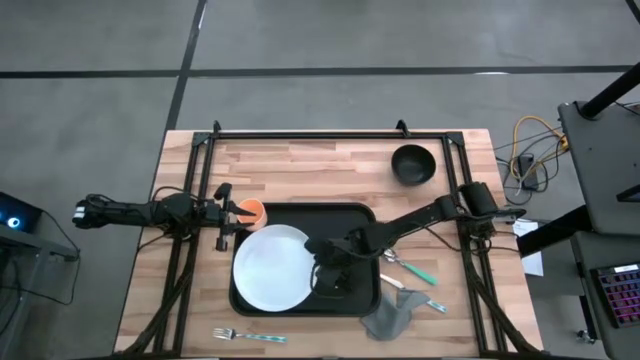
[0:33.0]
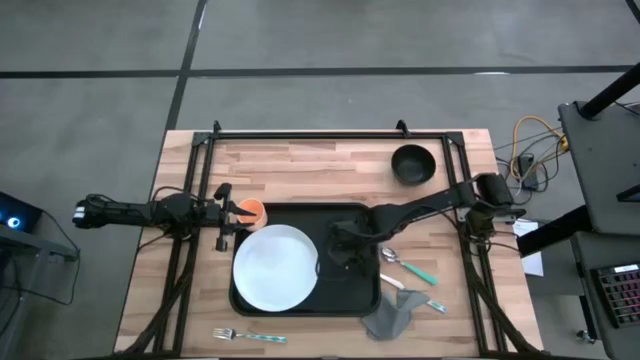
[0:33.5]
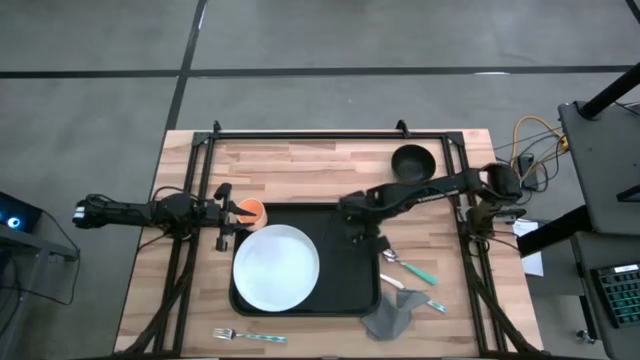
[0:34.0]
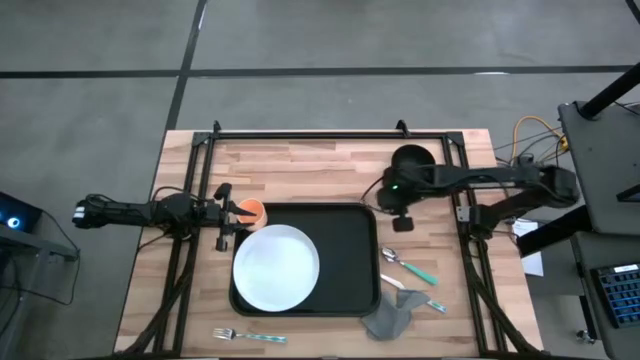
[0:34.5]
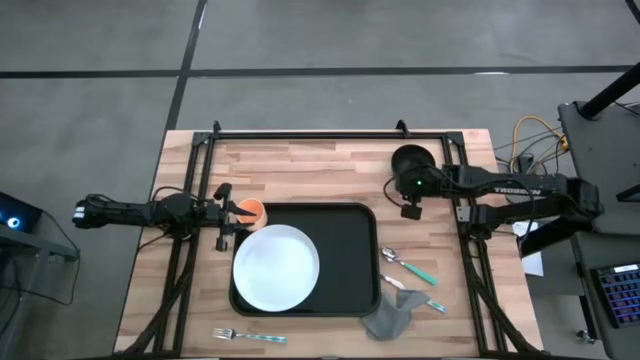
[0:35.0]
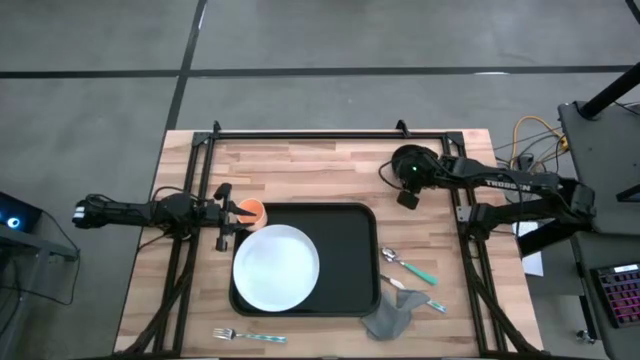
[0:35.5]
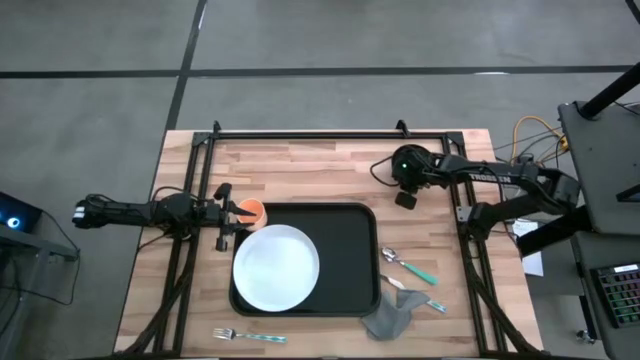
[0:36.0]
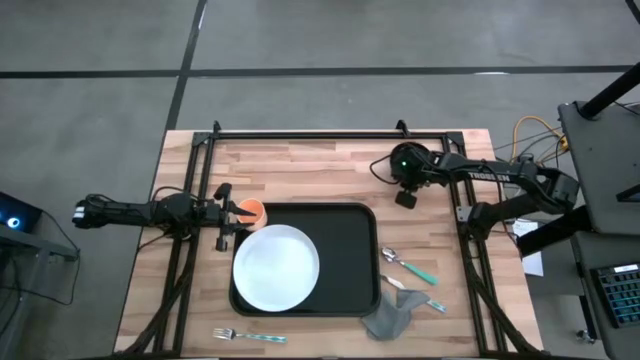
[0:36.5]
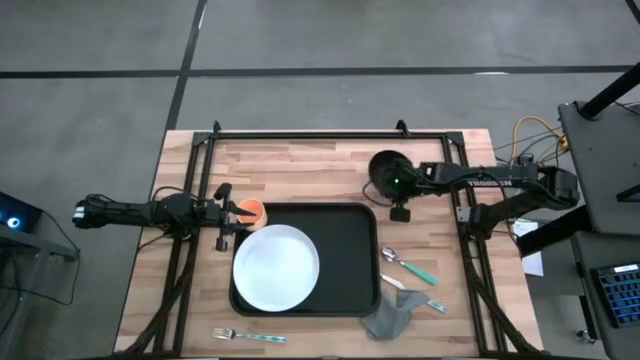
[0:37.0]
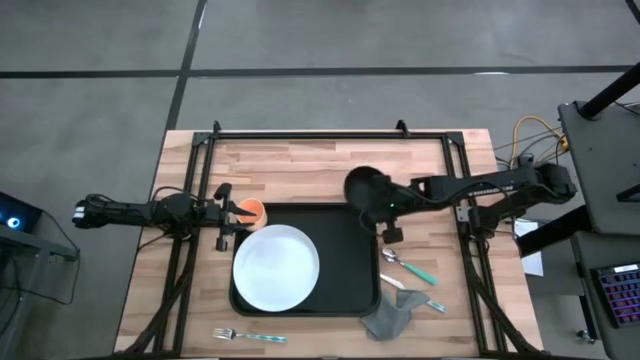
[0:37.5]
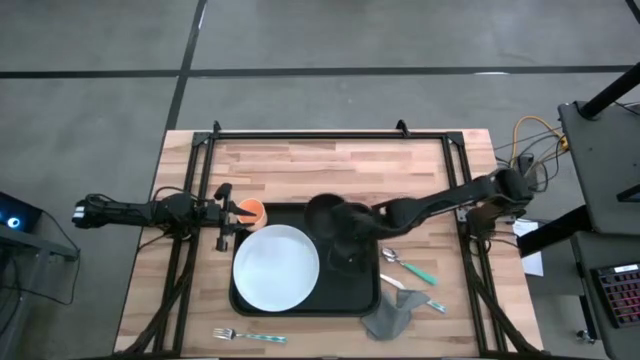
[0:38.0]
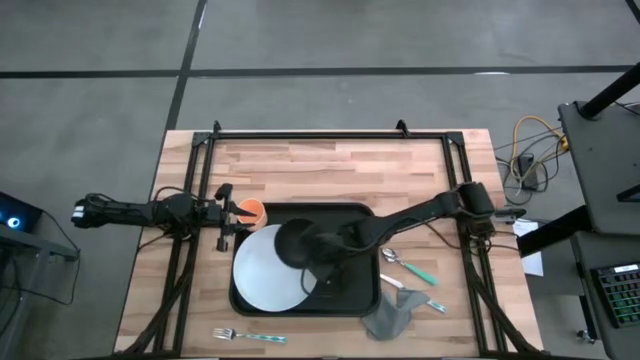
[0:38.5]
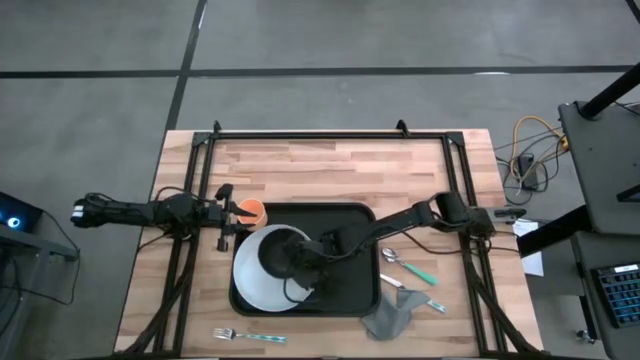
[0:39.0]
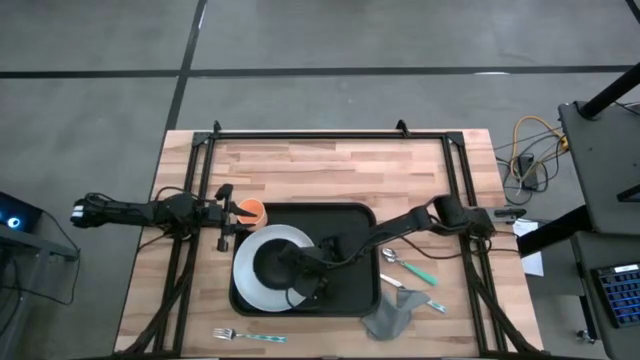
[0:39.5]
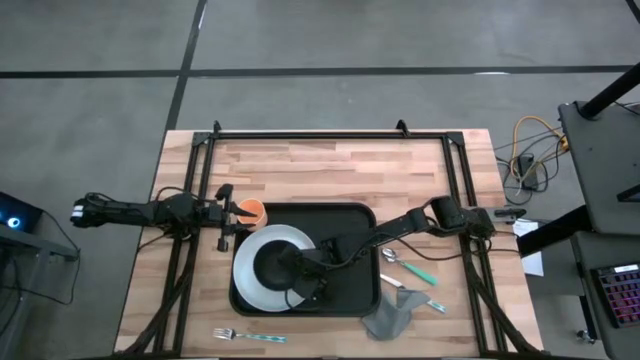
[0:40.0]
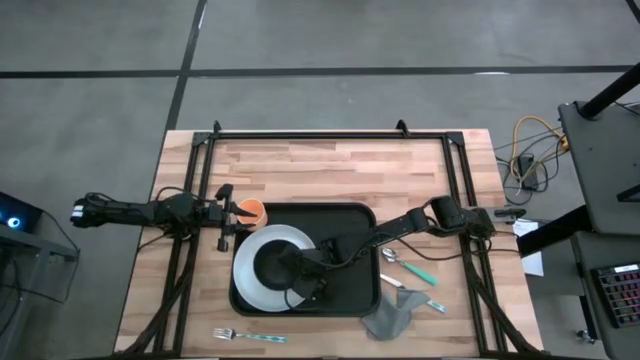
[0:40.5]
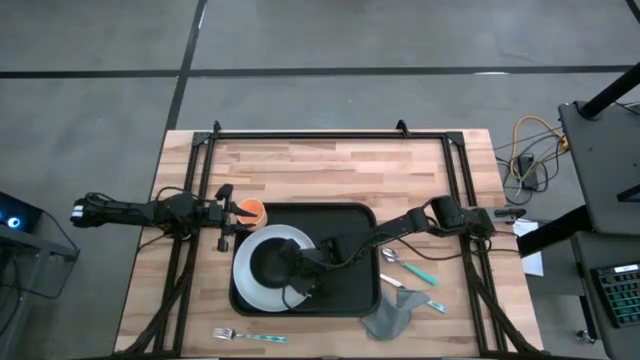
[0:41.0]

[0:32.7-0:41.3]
Task: Set up tray
Put the bowl onto the plate

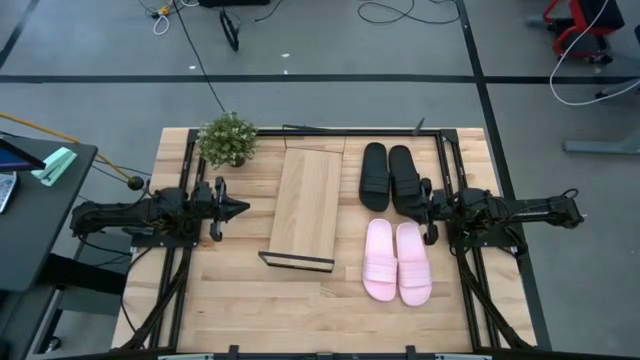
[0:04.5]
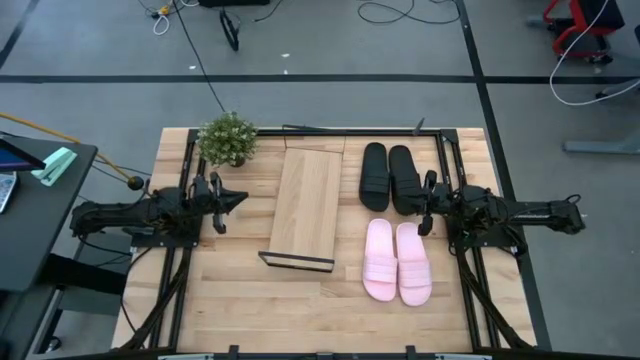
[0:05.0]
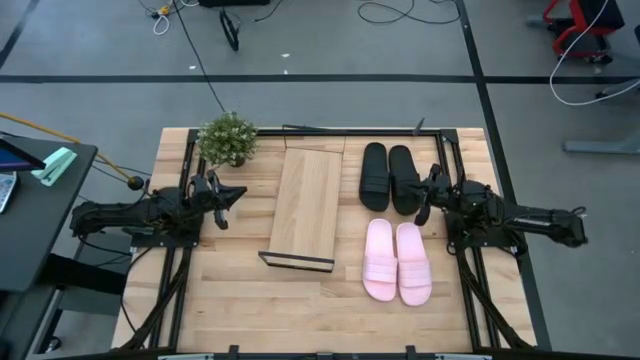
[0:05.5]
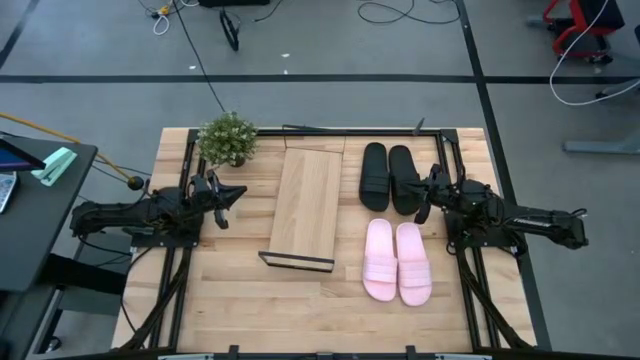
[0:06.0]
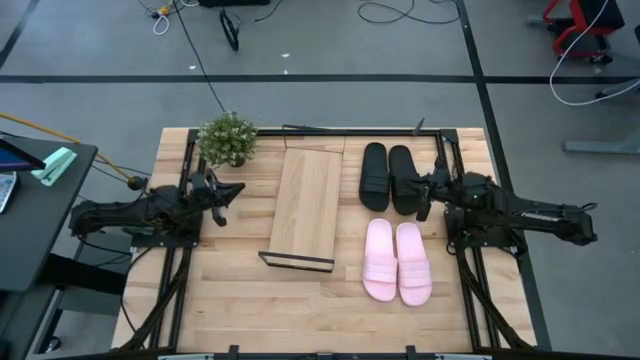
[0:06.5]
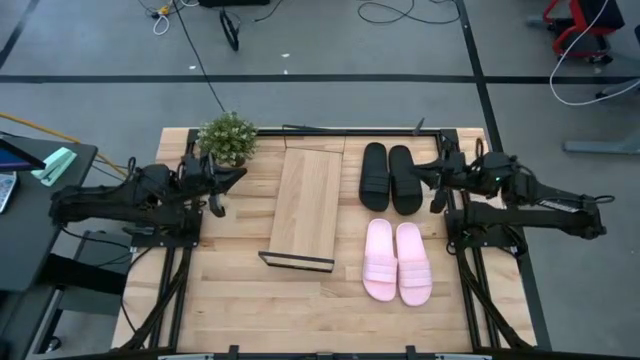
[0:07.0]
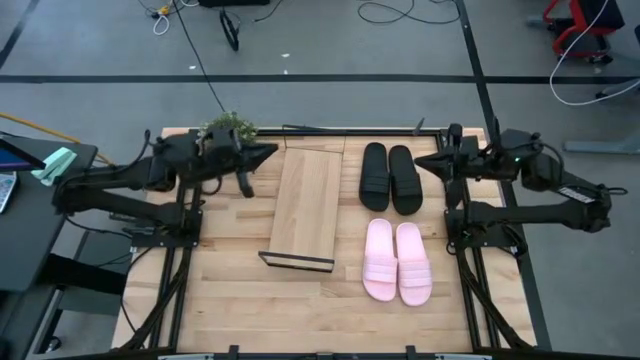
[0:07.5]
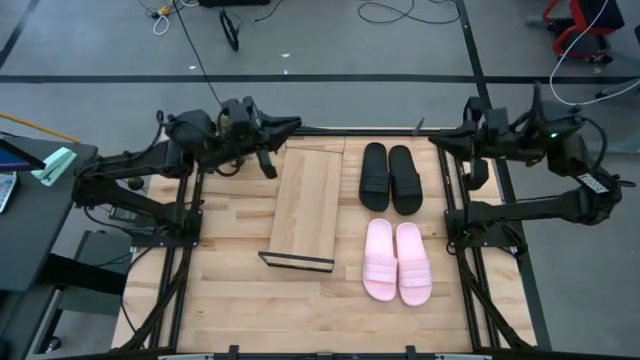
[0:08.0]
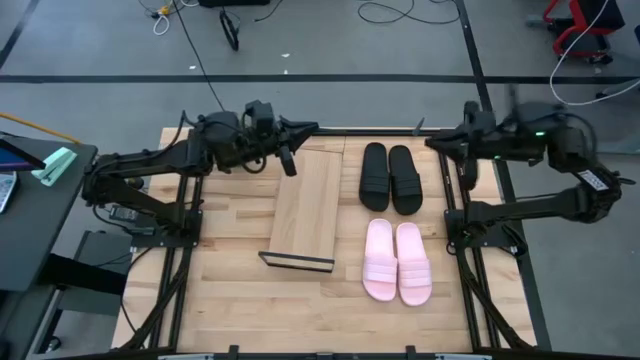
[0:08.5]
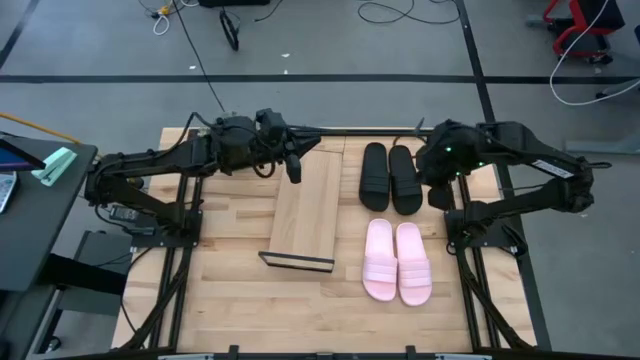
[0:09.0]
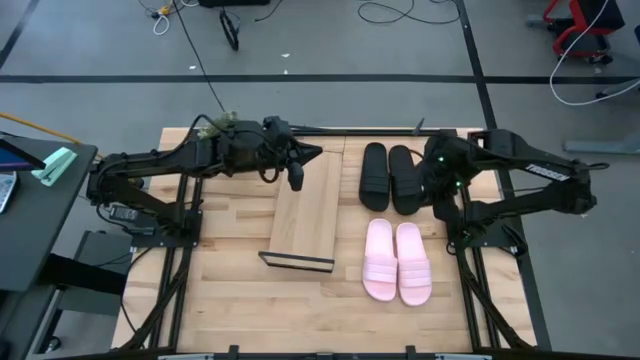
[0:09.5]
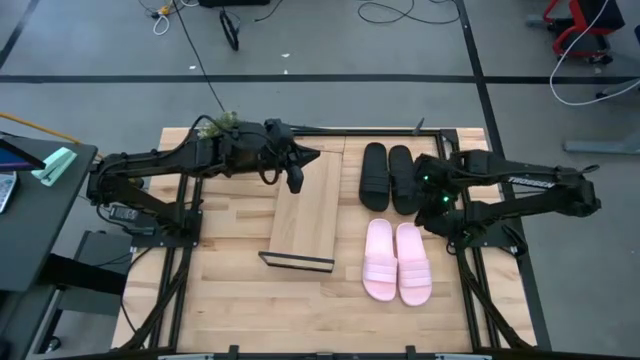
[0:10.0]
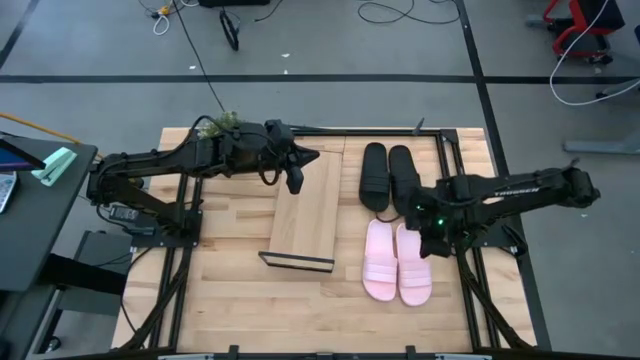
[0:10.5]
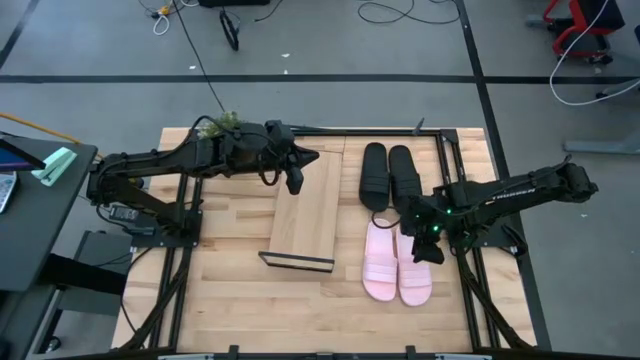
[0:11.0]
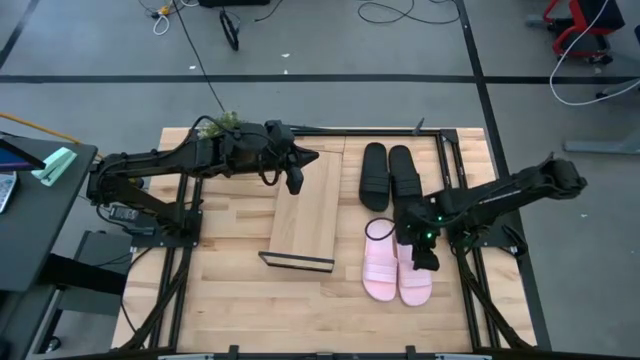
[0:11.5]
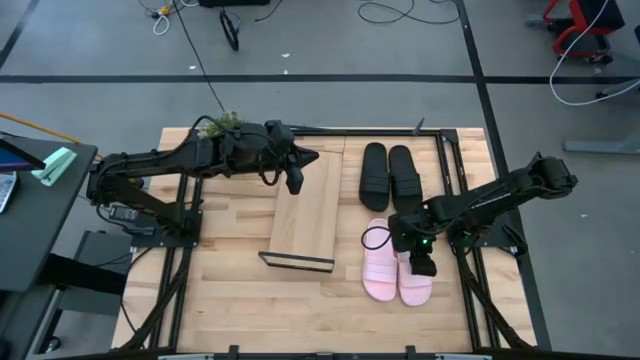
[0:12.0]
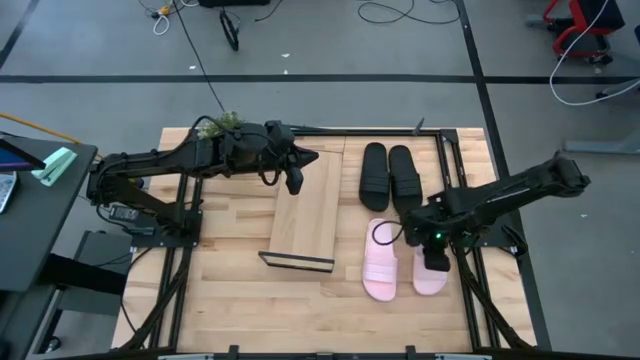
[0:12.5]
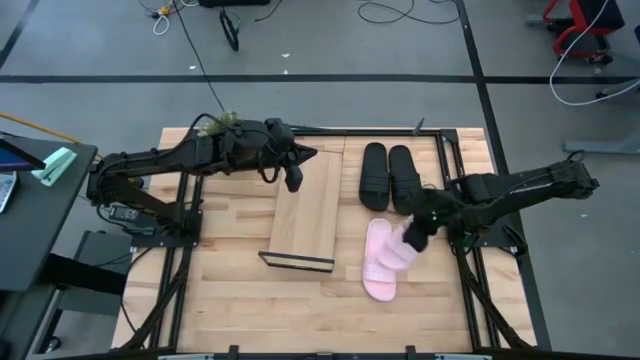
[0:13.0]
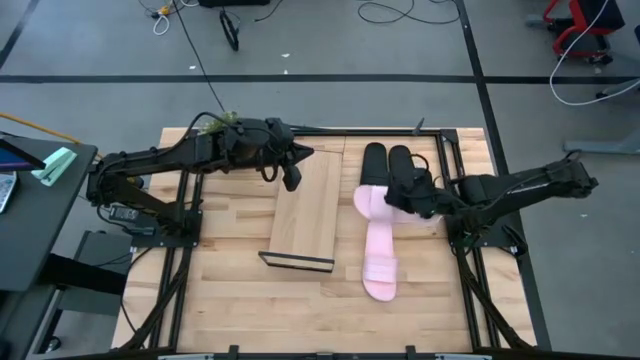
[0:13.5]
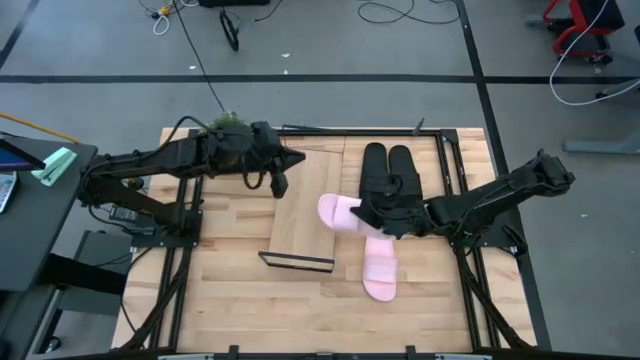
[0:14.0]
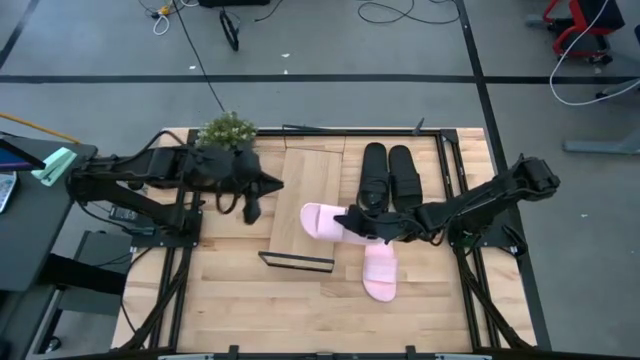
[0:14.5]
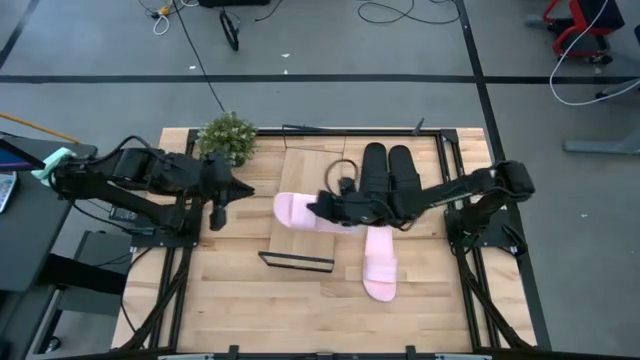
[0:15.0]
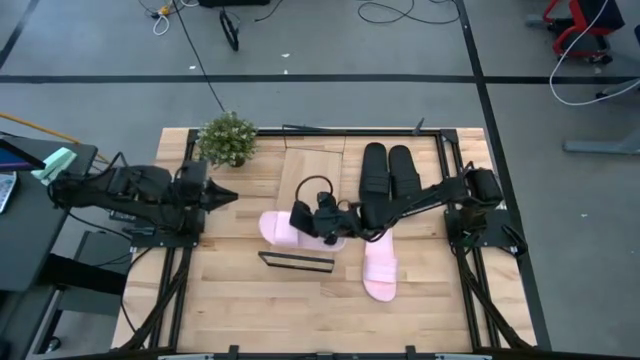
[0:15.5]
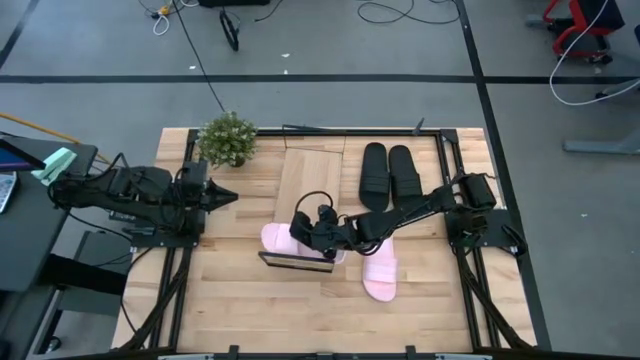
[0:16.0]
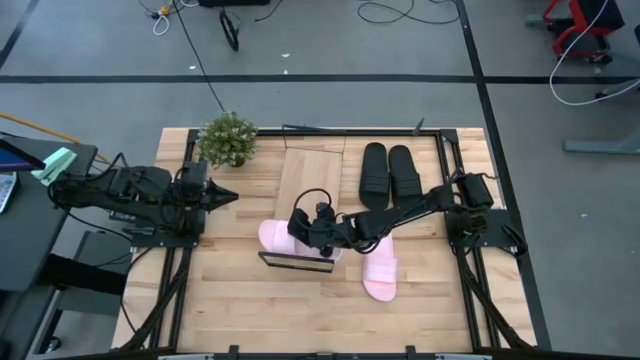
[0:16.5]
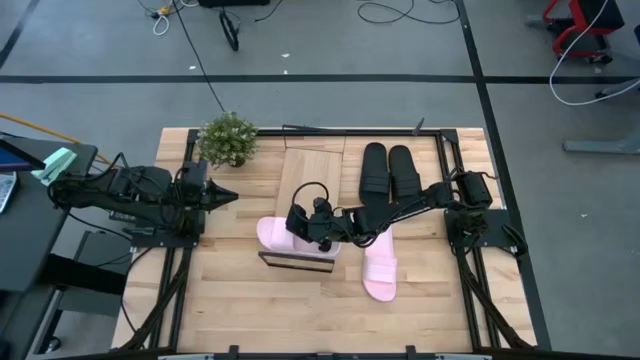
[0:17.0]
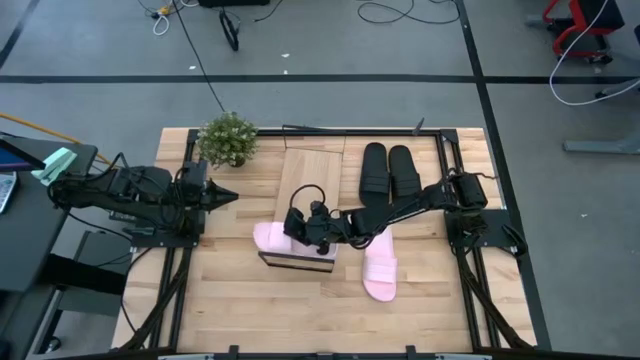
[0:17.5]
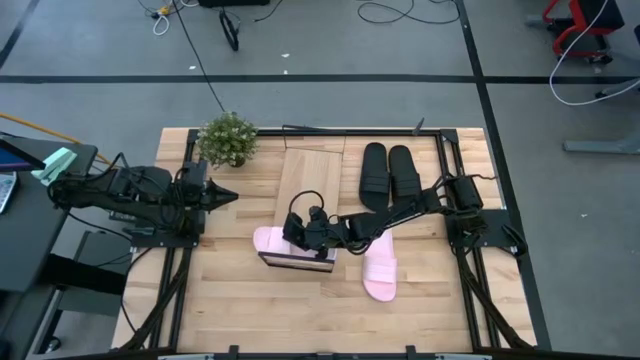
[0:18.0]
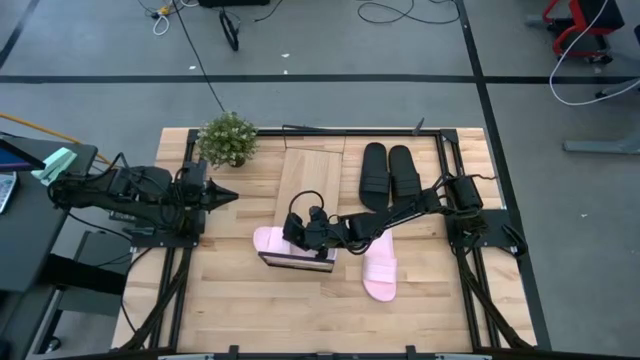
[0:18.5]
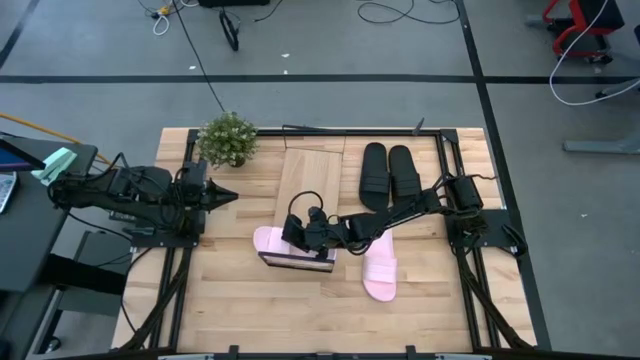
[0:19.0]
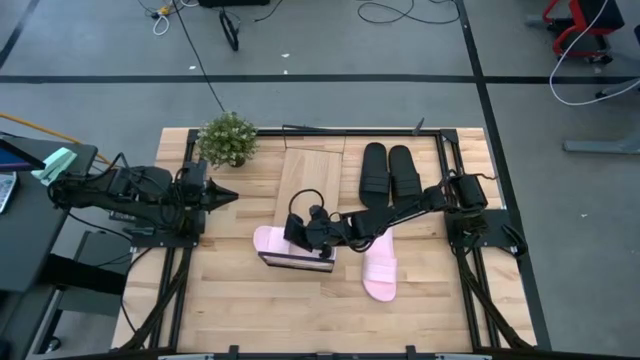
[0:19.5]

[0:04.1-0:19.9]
Task: Pick and place slides into the shelf
Put the right pink slides on the shelf
